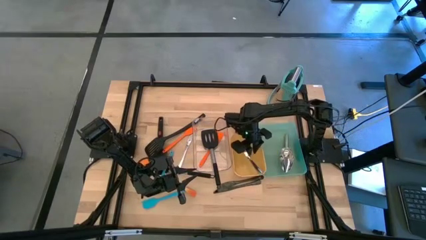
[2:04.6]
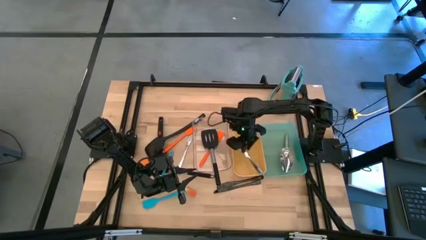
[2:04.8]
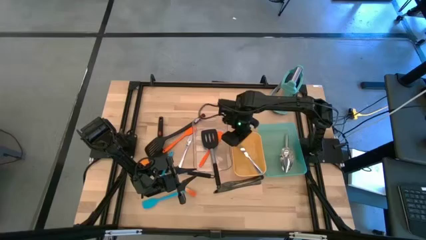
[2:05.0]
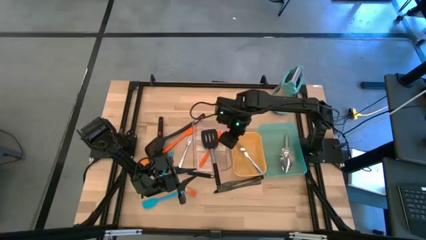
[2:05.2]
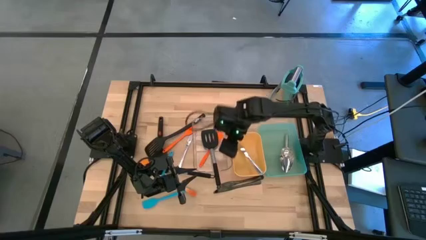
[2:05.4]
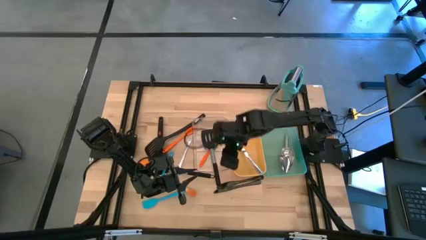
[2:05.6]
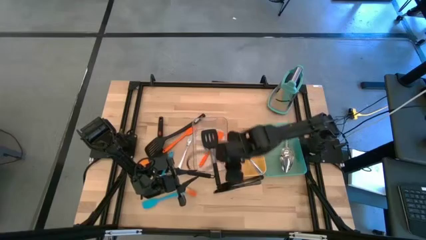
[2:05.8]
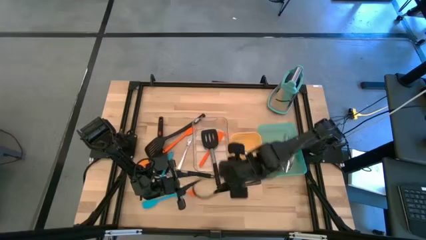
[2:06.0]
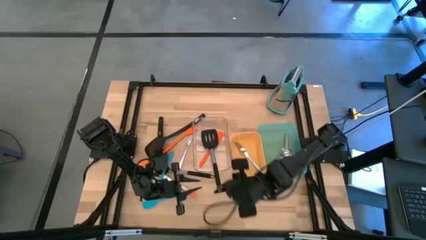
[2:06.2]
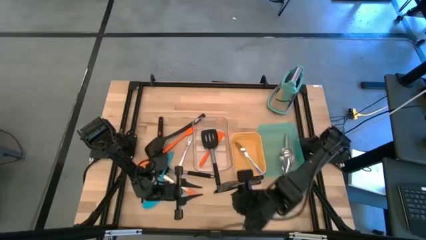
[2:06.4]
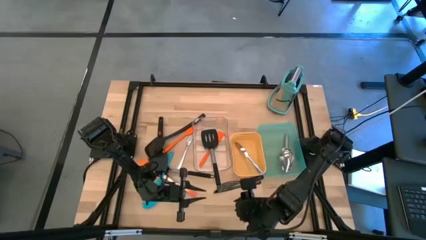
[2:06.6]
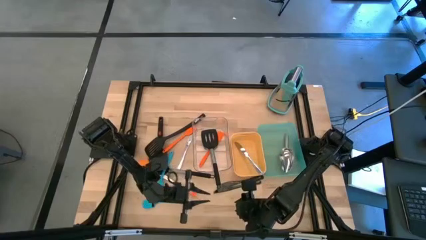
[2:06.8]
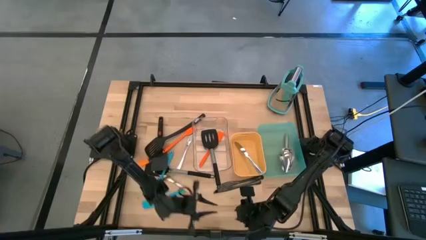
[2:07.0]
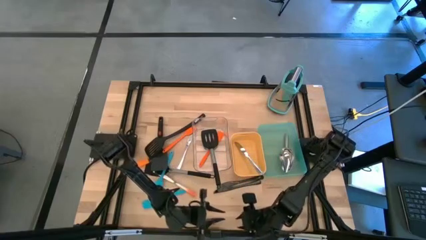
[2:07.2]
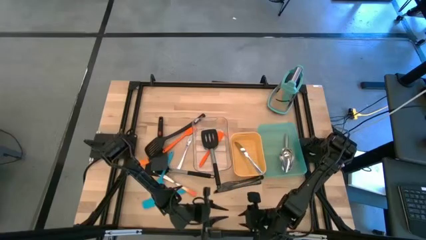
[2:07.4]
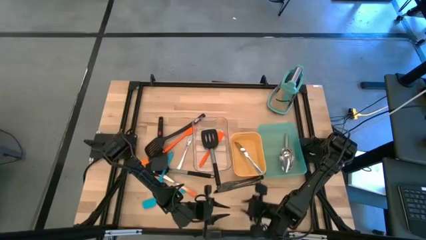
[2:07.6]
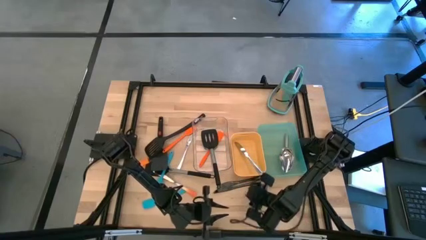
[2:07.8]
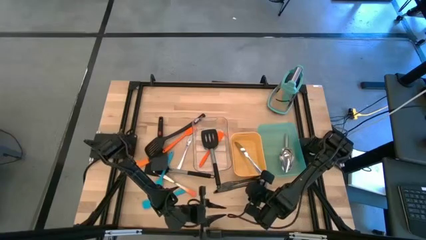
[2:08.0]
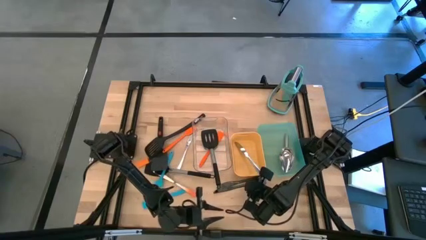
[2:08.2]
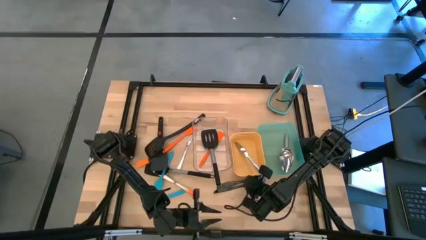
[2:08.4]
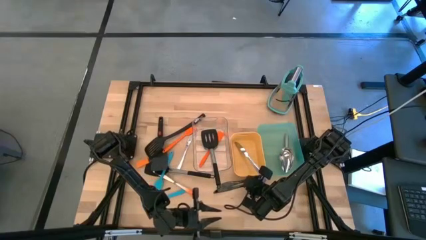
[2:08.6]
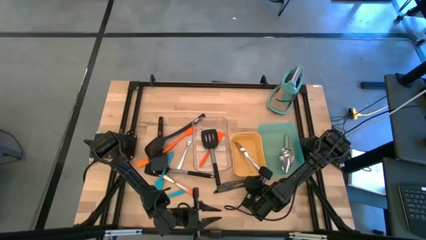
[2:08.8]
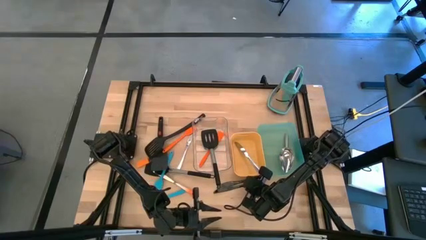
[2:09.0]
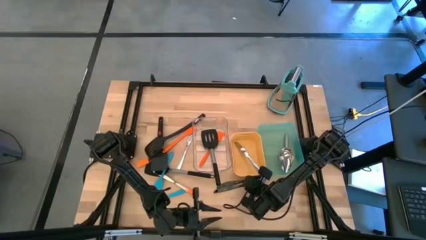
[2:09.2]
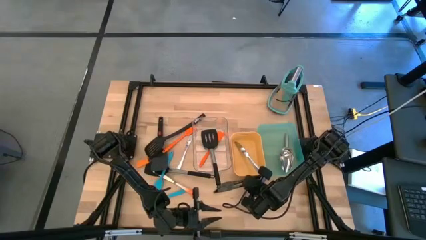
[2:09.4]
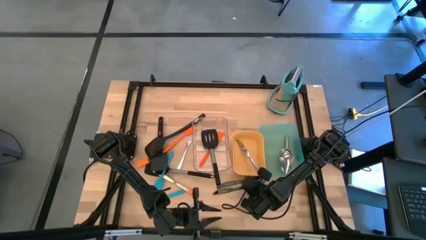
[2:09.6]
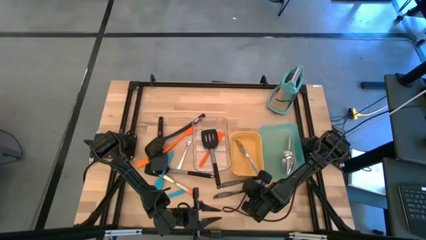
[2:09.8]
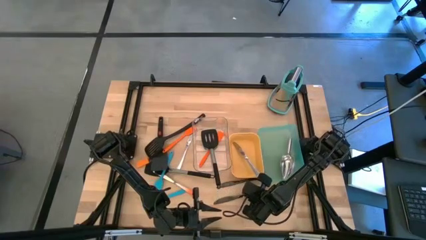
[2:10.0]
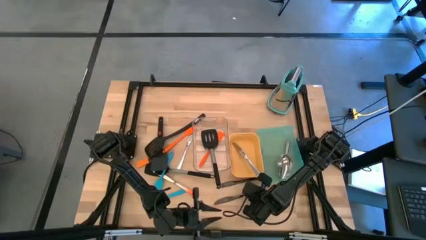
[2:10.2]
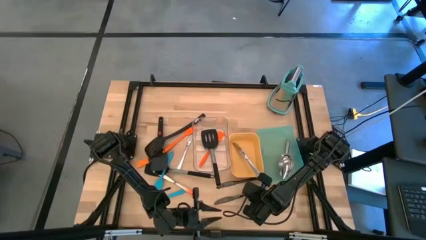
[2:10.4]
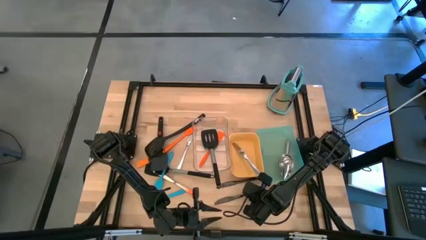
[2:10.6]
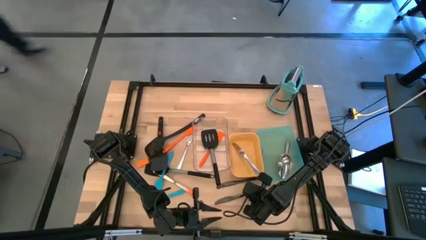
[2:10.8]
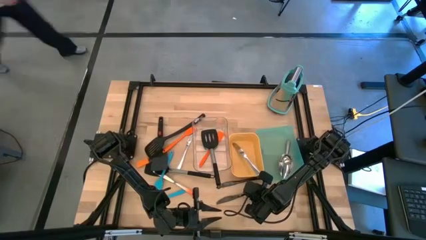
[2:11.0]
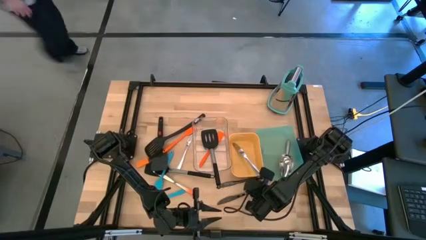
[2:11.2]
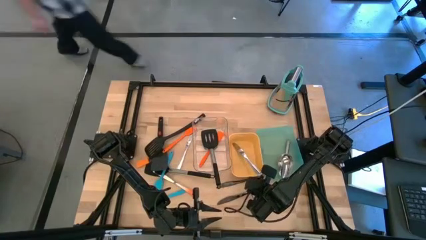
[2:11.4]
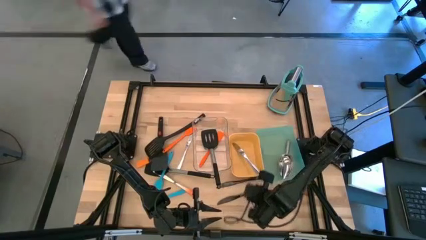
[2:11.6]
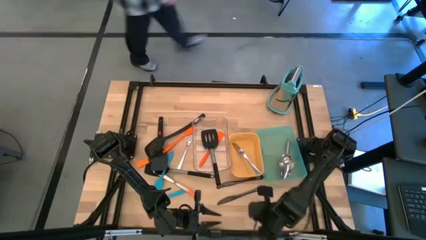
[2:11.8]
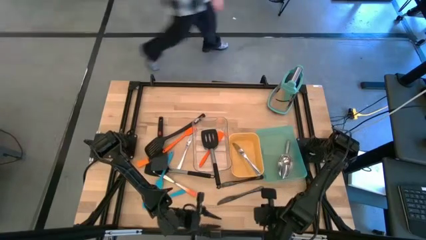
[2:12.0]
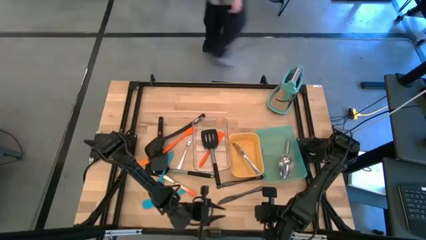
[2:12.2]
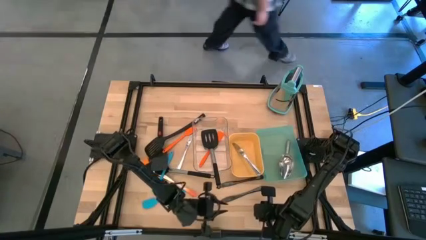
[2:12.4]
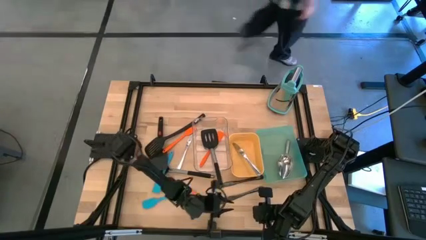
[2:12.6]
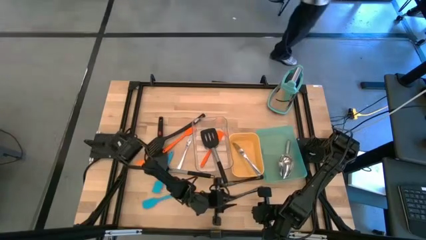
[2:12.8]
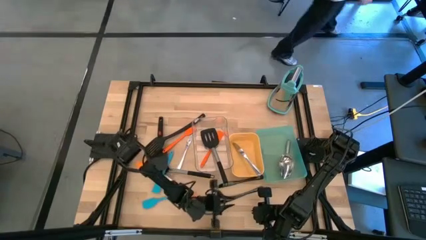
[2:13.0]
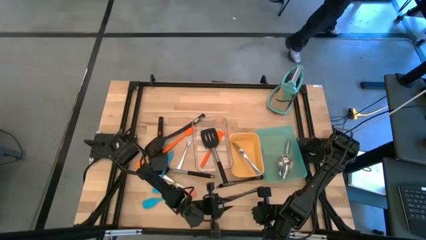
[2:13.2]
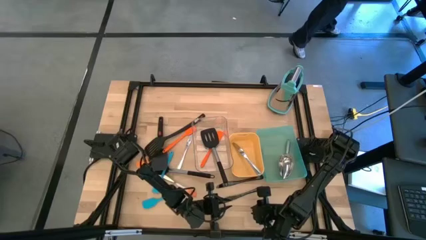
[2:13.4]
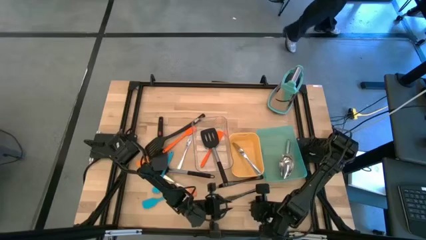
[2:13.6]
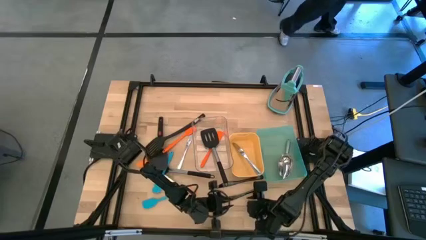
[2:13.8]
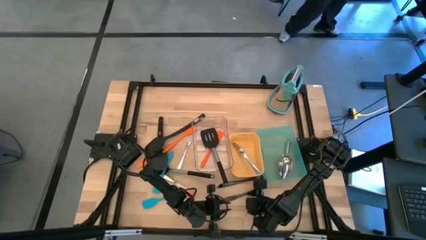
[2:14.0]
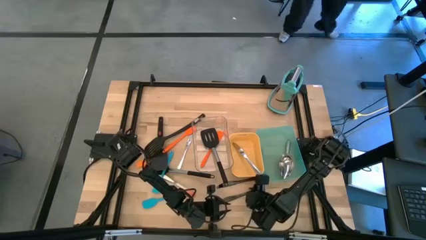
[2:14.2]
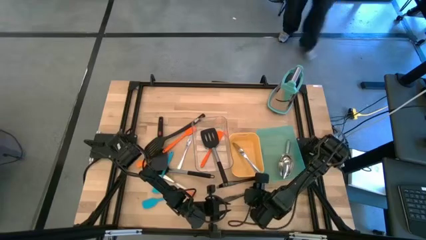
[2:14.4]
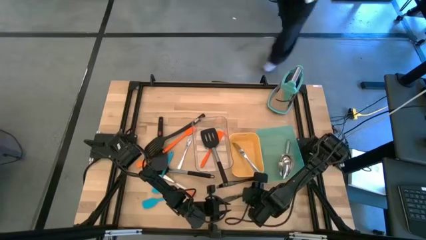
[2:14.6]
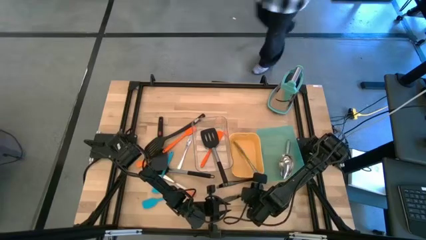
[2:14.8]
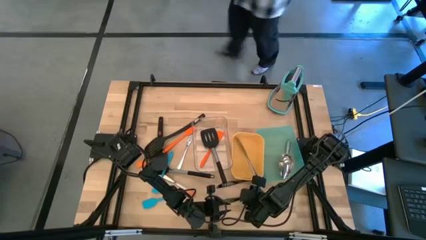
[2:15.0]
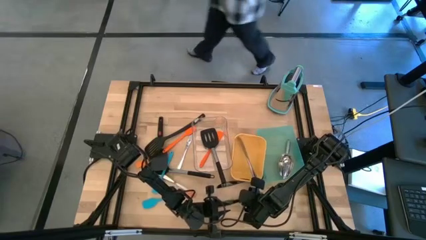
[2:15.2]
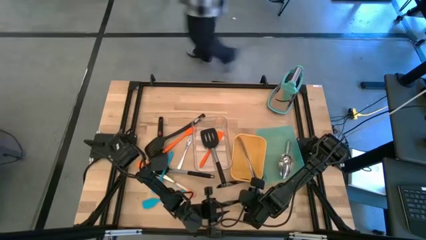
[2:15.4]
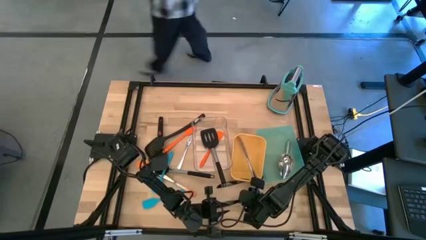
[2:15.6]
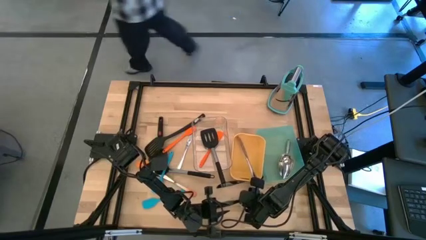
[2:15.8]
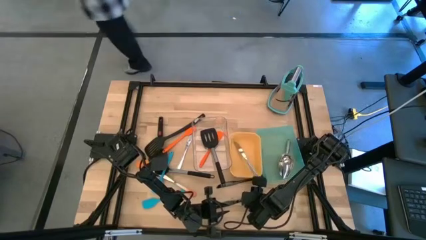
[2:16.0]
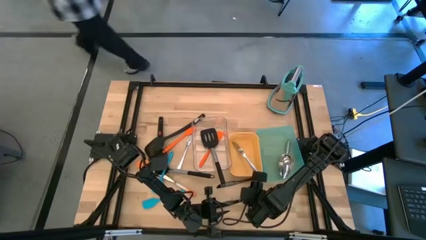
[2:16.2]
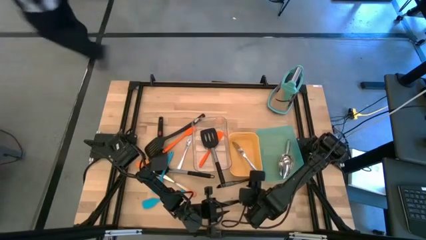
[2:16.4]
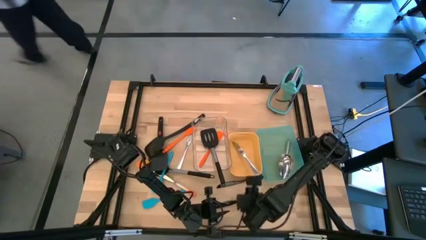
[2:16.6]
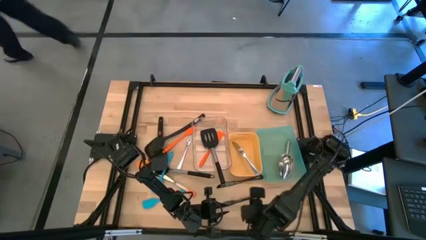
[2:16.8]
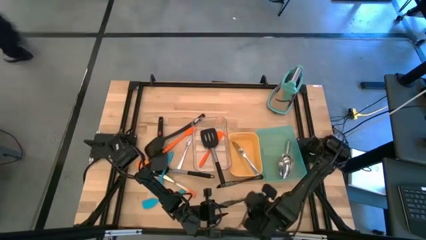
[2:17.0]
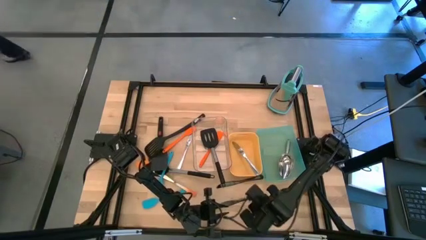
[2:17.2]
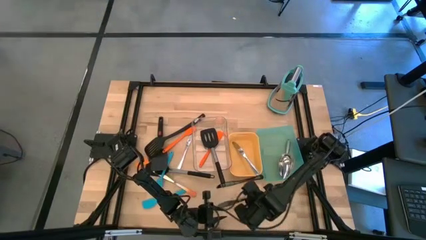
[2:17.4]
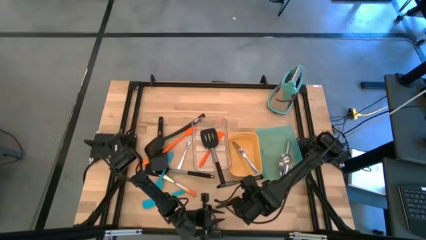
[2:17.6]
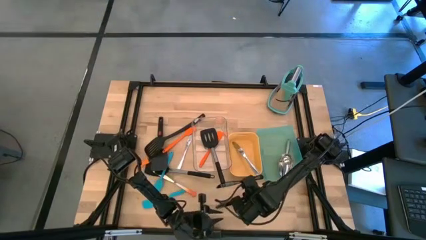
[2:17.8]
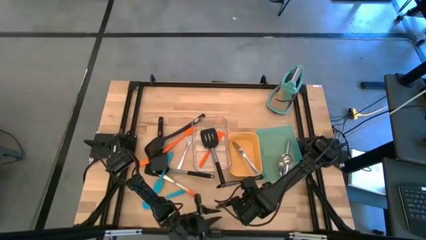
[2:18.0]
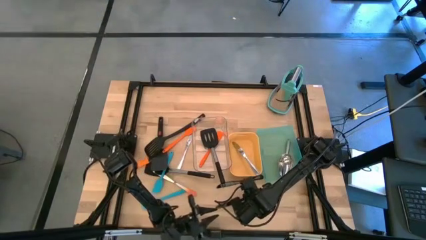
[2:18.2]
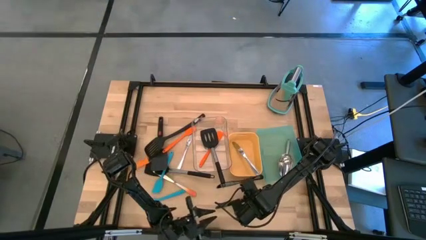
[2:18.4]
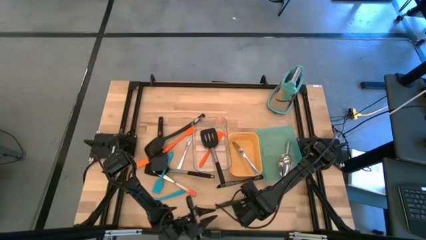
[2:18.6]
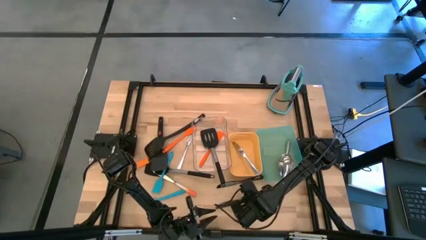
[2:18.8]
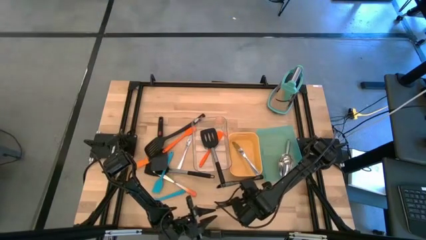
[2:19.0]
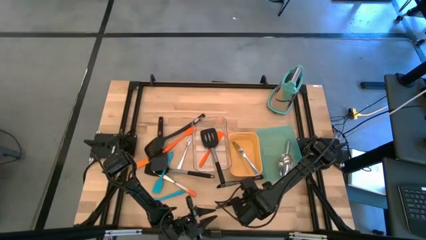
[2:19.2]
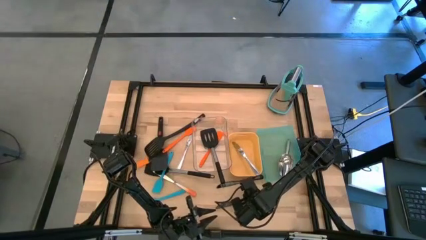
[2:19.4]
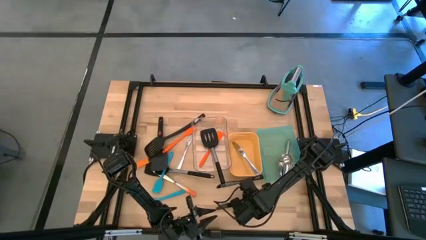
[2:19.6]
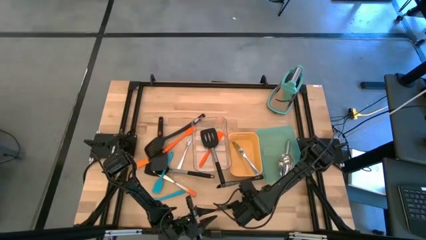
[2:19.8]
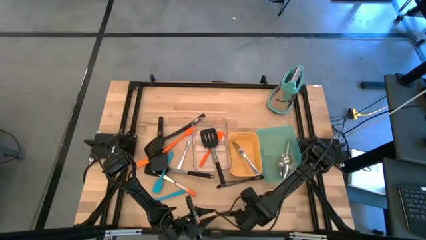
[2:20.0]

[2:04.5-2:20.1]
Task: Pick & Place Kitchen Items
Adjust the black table knife

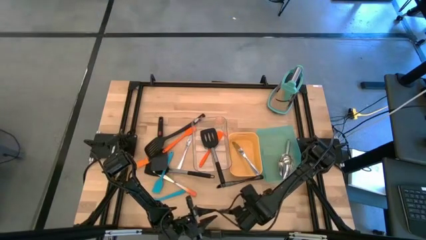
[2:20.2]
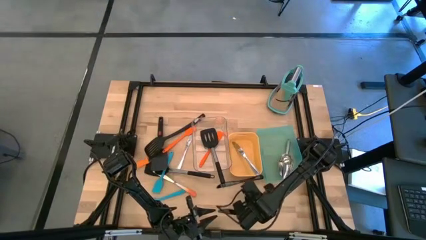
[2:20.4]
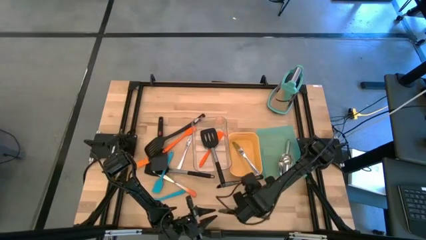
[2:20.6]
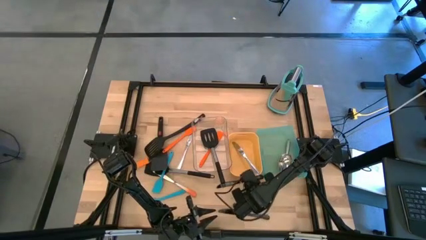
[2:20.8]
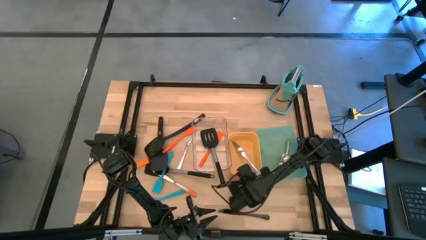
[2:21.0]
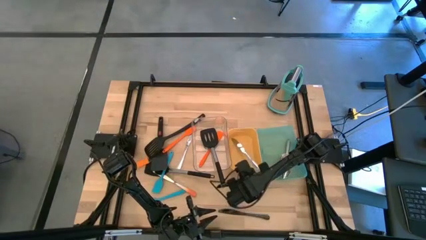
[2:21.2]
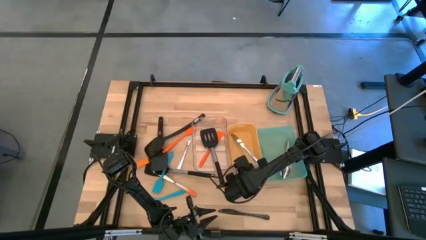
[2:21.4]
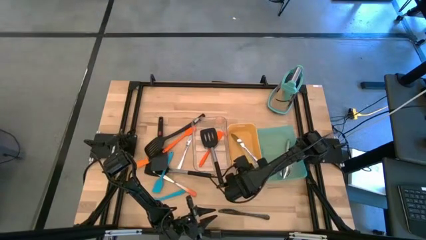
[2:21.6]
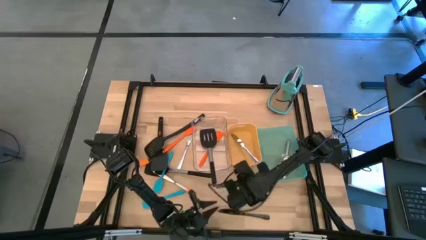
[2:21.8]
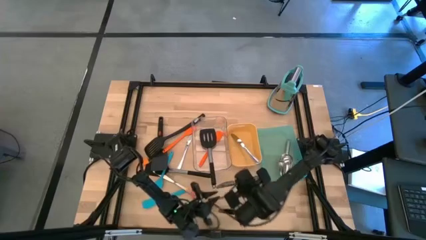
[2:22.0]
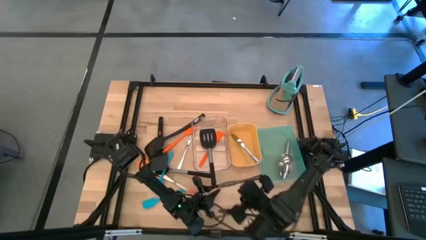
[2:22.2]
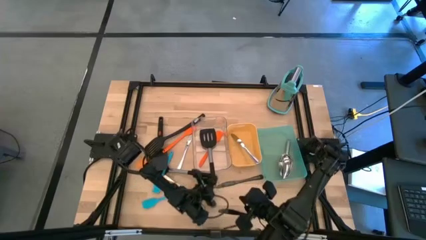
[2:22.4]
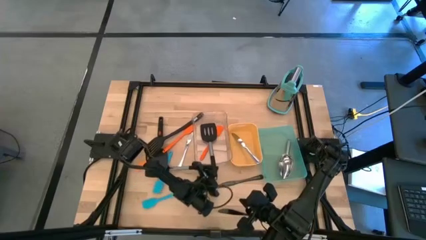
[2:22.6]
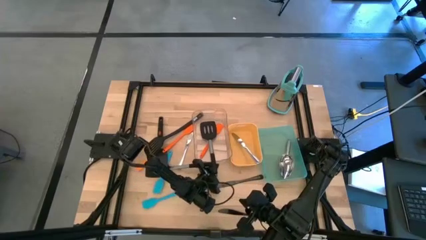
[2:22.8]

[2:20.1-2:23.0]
Adjust the bins
